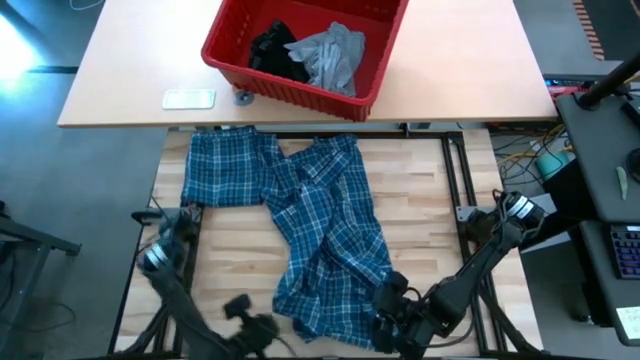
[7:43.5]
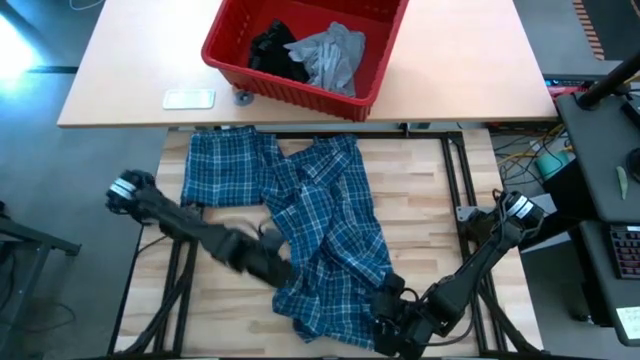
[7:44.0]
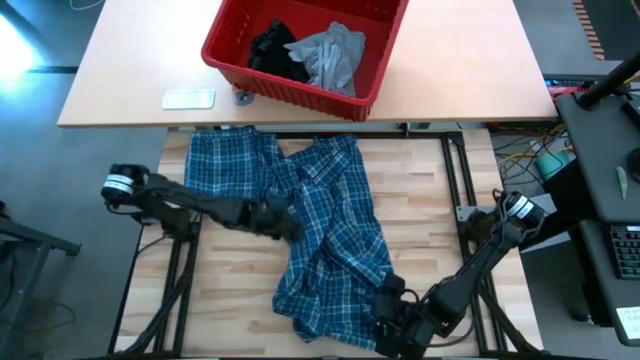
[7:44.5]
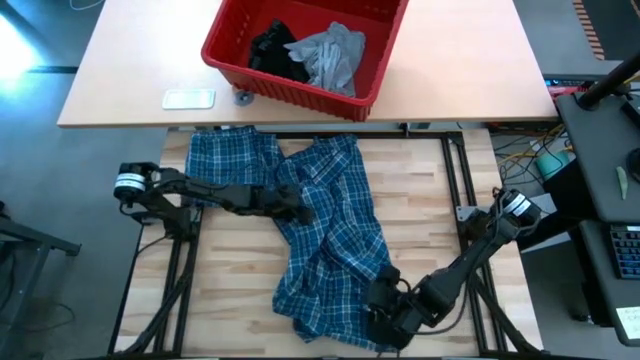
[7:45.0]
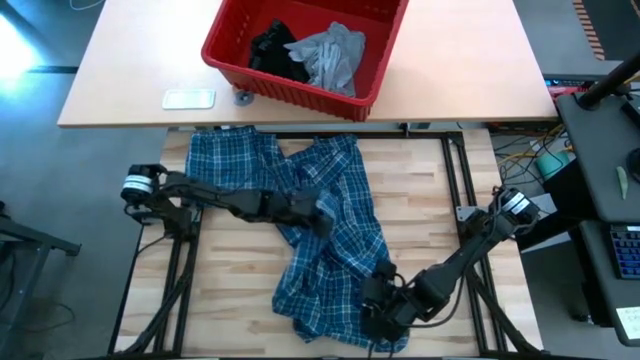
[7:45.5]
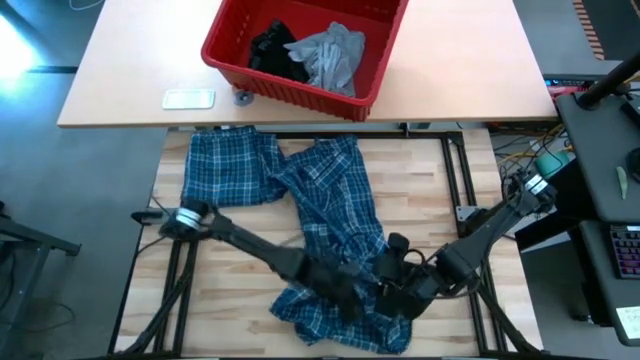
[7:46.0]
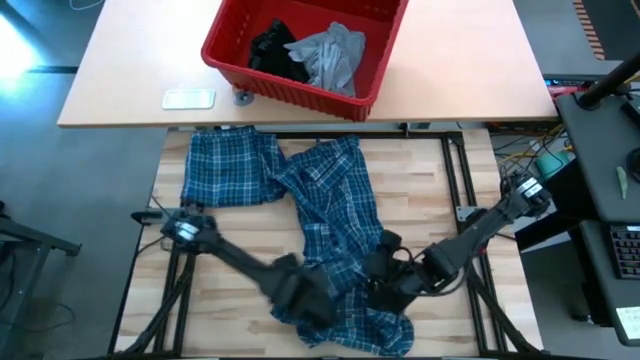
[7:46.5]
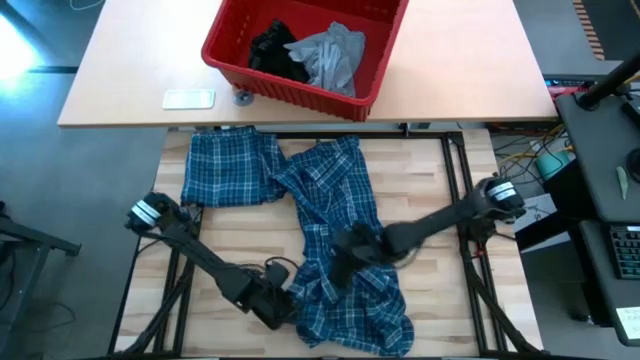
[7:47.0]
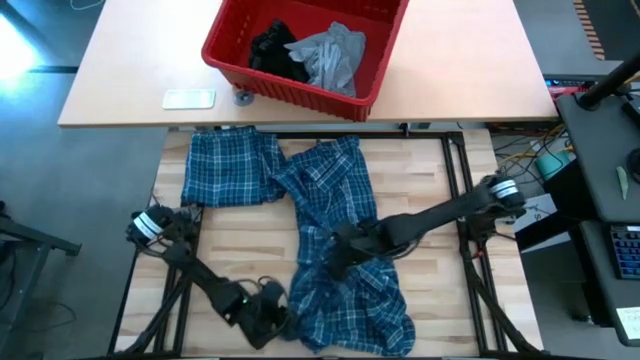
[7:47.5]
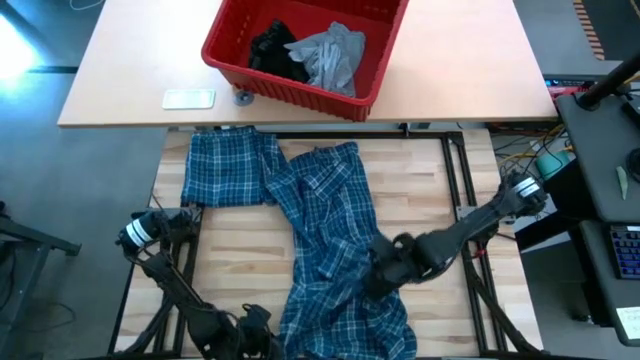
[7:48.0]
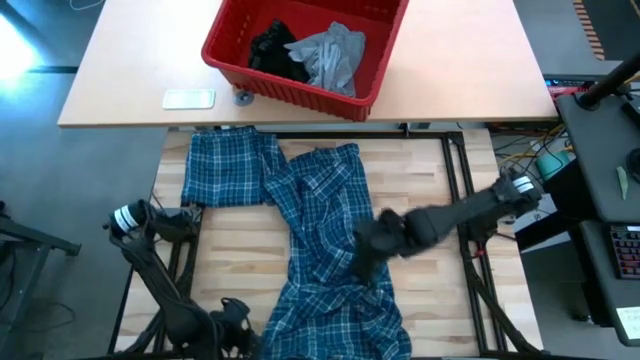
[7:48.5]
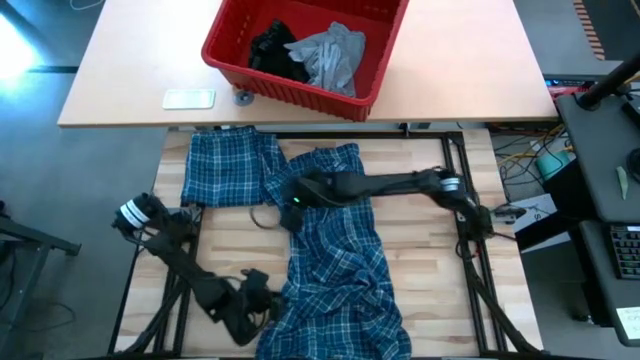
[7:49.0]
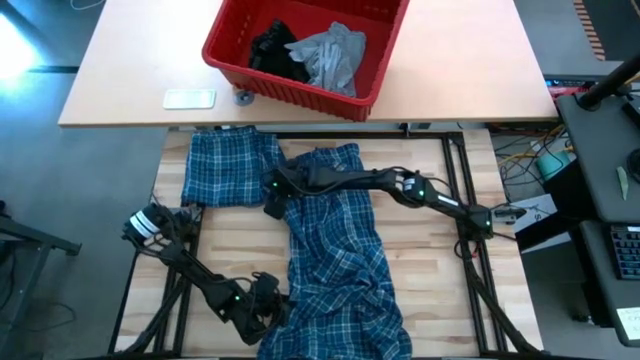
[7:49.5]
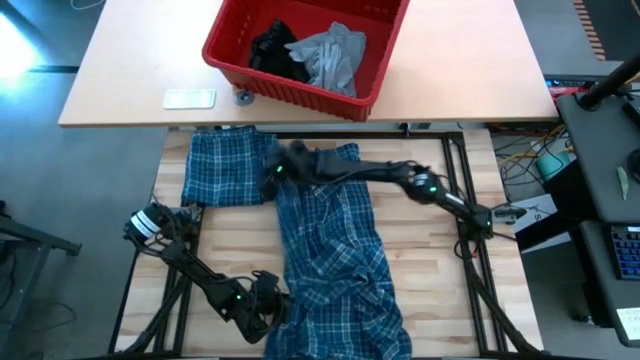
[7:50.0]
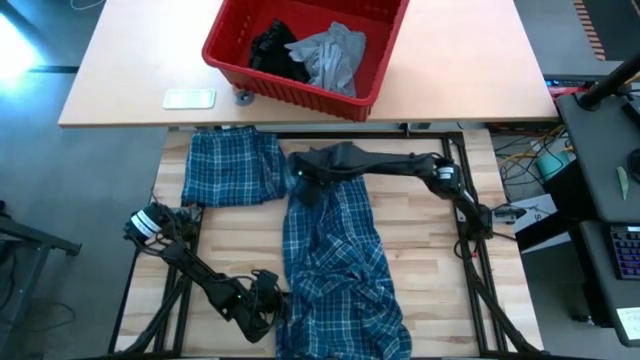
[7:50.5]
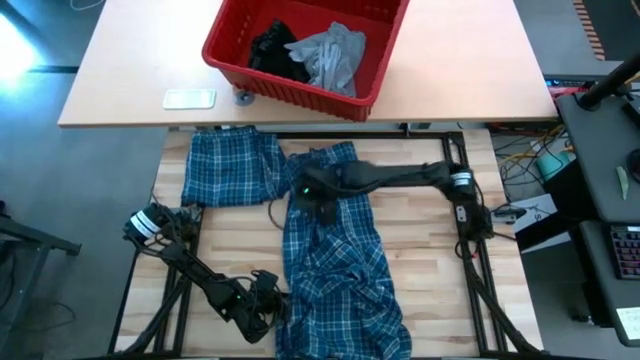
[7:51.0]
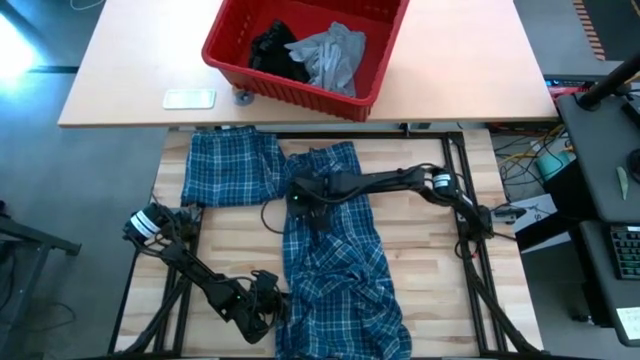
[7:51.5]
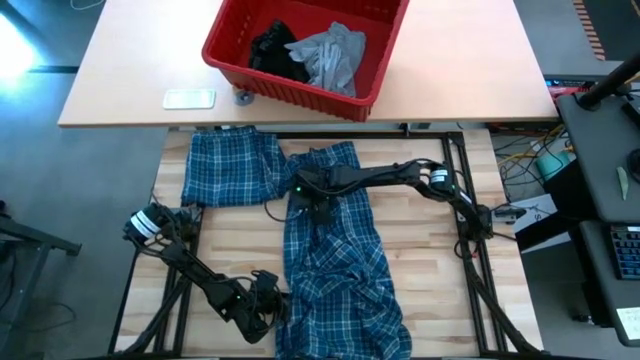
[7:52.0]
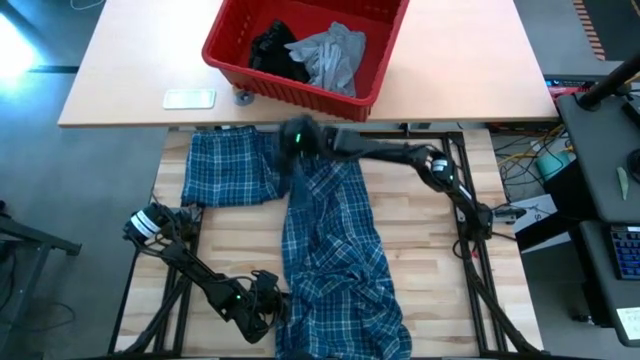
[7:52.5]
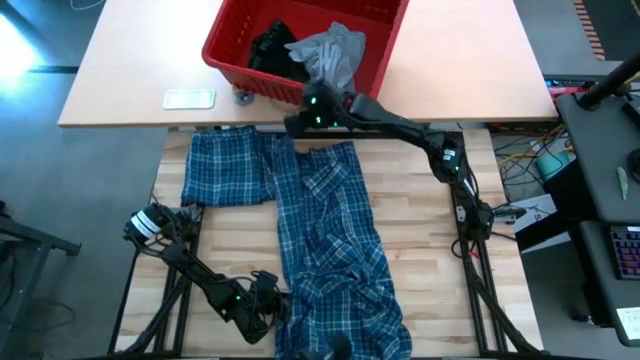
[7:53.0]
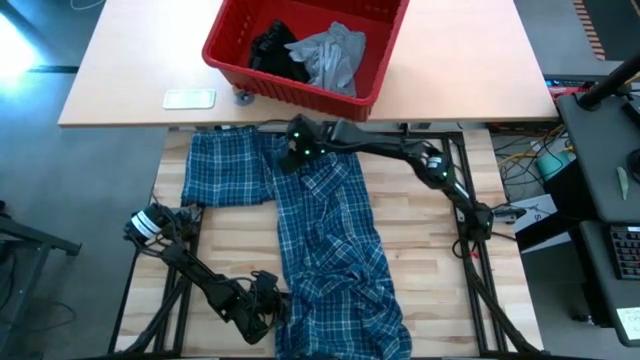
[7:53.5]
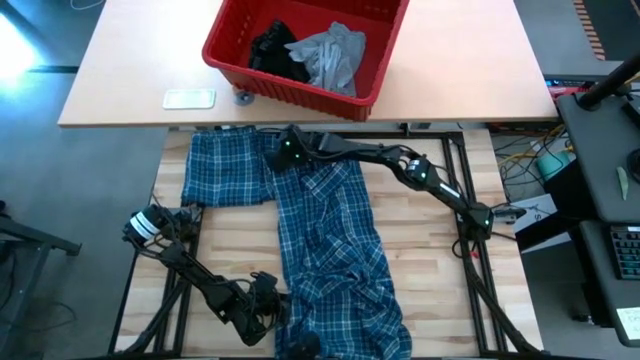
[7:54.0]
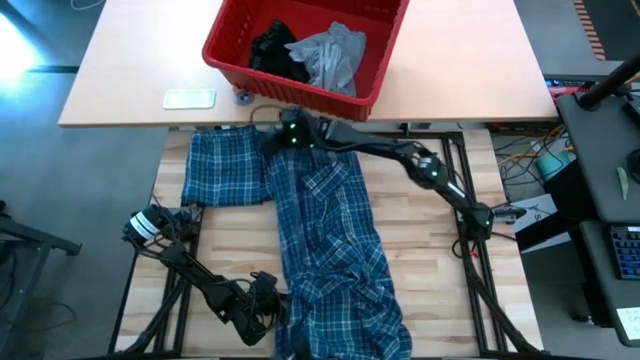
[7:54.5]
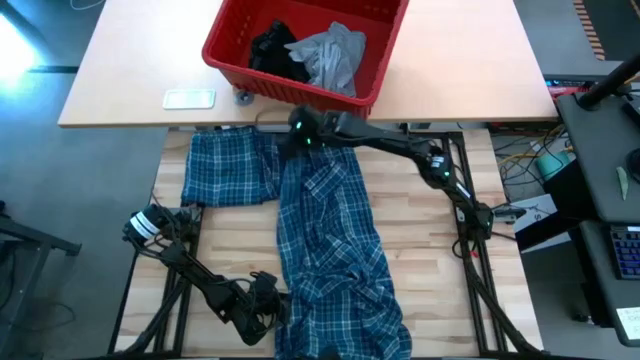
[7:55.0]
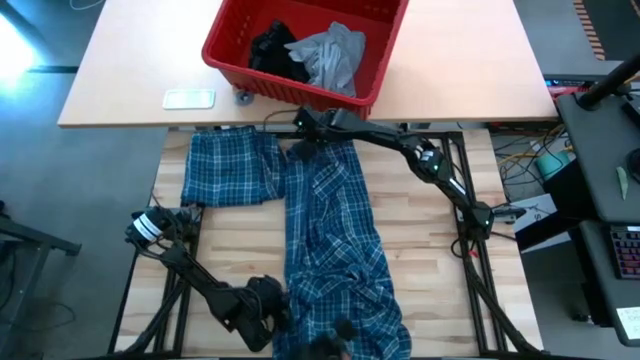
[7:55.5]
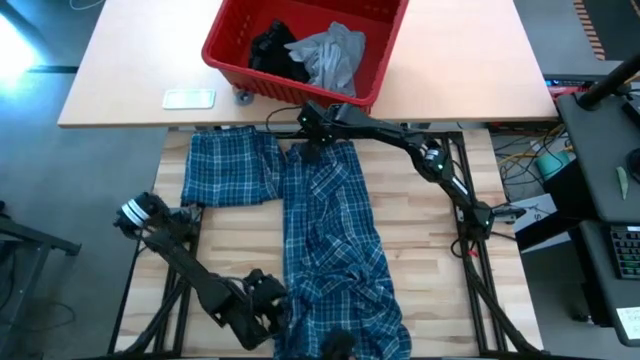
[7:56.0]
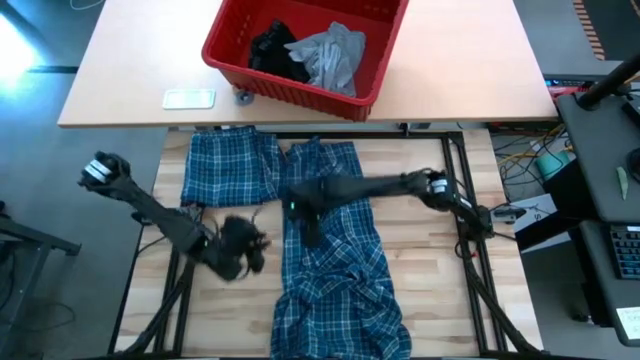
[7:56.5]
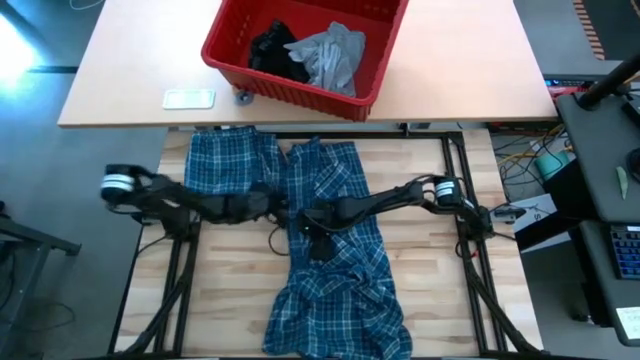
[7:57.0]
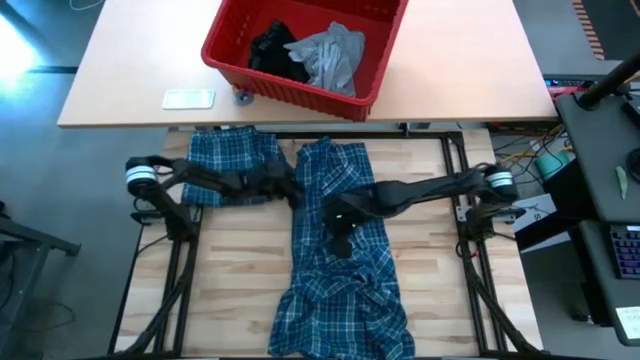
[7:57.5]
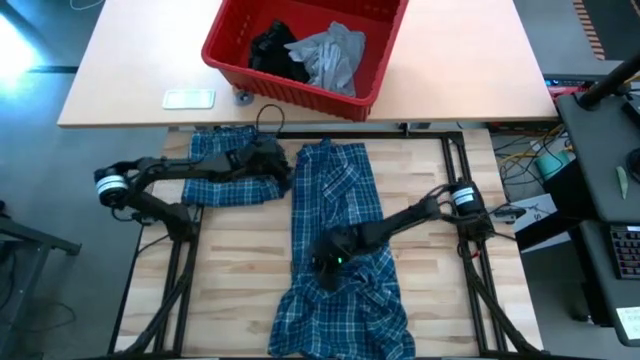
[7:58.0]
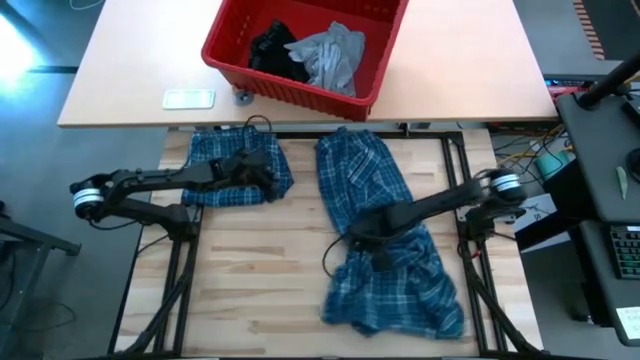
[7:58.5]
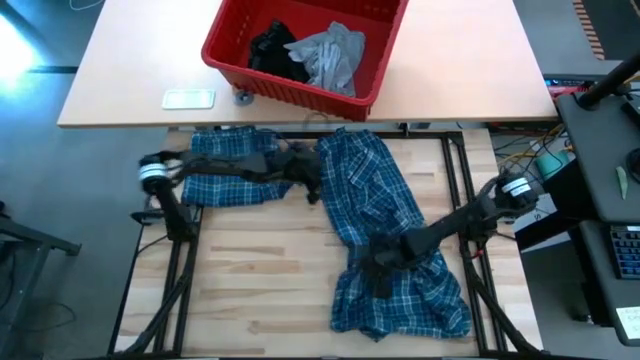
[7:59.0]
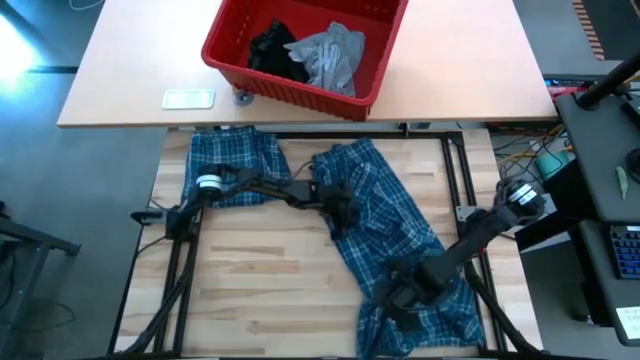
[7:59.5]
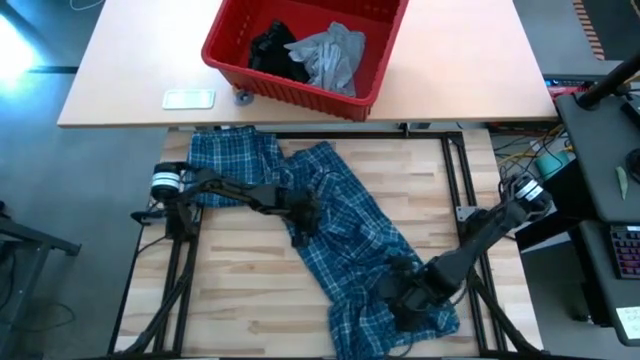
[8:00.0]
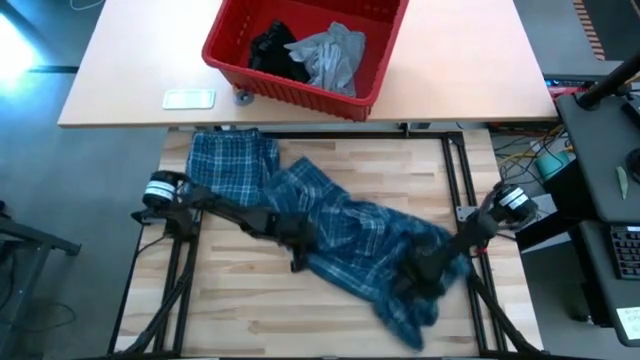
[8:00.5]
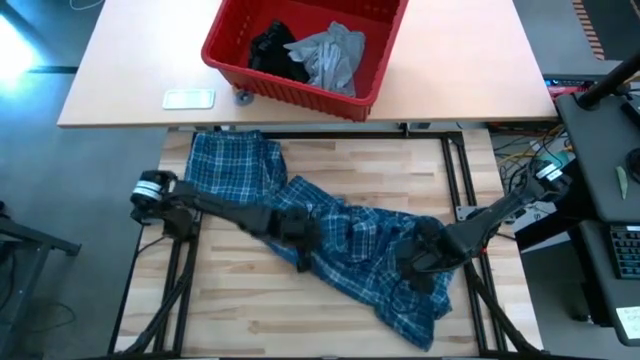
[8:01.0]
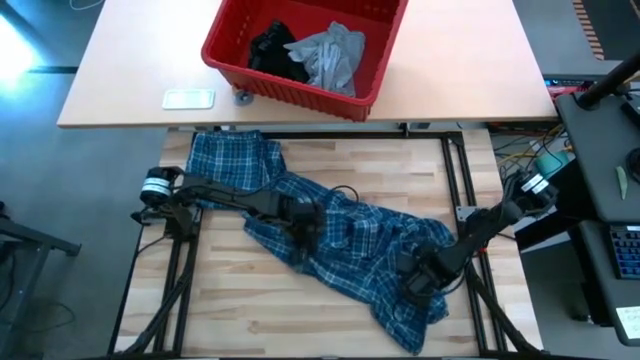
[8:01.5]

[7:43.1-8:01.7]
Task: Fold Laundry from Bin
Fold the blue patterned long sleeve shirt

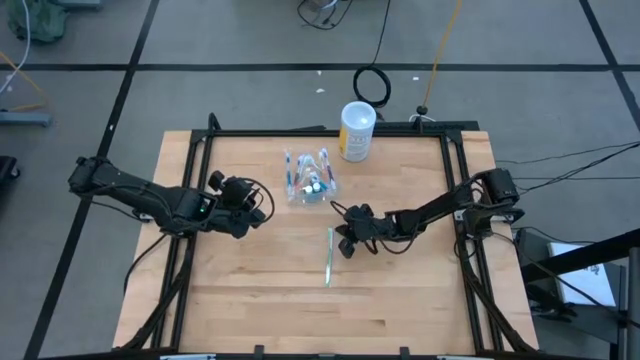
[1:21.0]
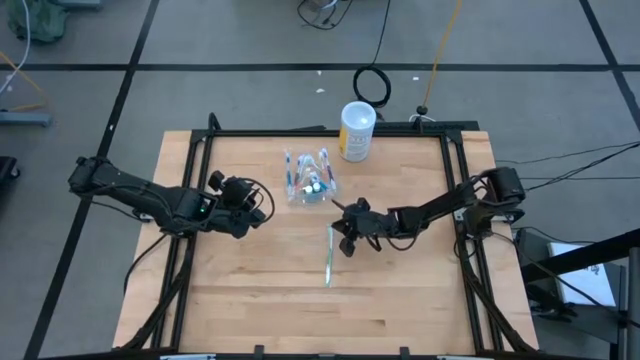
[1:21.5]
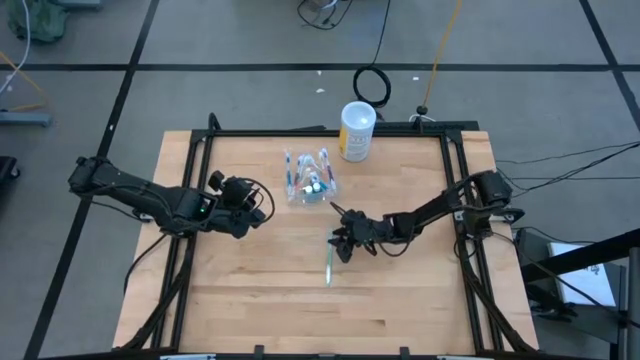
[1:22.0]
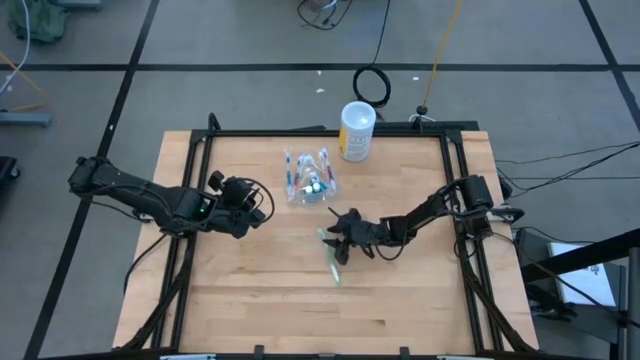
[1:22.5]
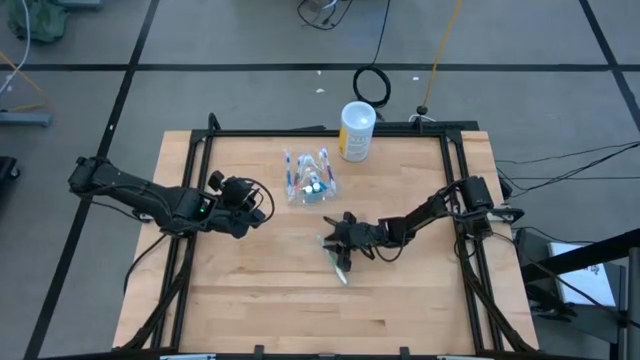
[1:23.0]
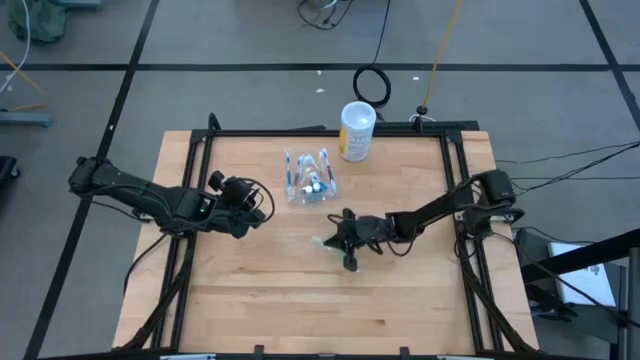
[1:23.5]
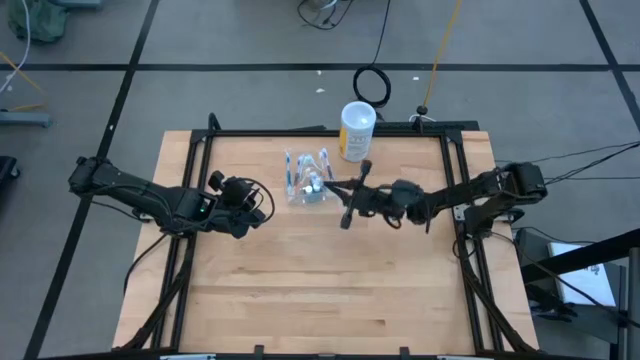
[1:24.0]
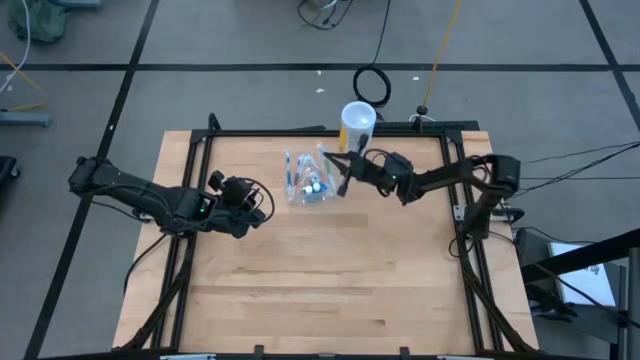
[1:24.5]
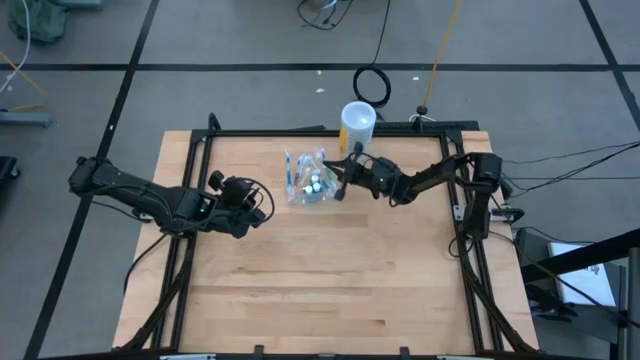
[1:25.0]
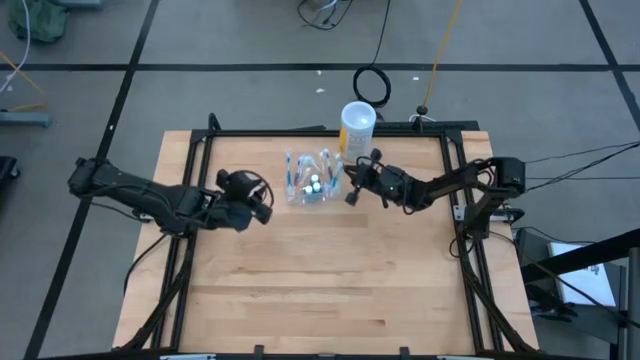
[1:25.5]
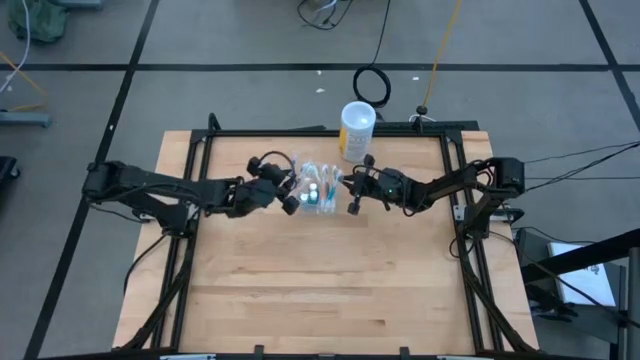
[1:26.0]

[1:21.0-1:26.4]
Task: Pick & Place toothbrushing station
Put the green toothbrush into the transparent organizer
